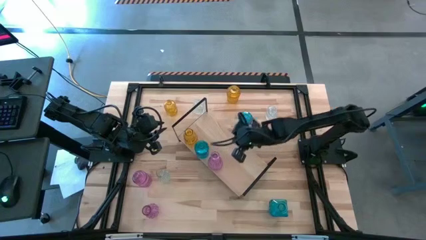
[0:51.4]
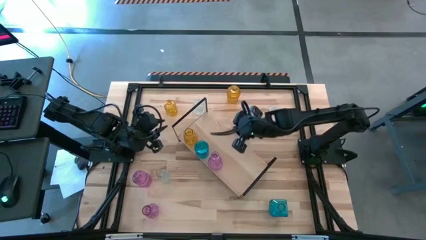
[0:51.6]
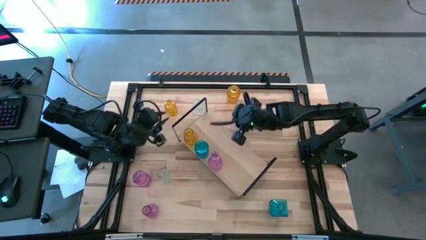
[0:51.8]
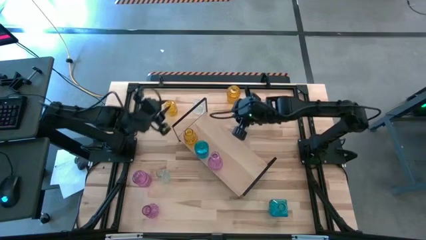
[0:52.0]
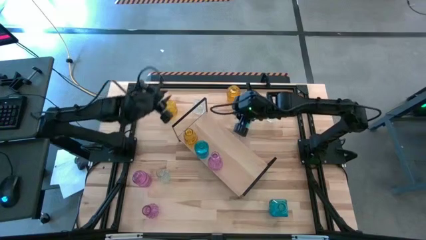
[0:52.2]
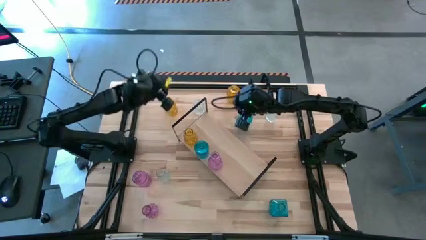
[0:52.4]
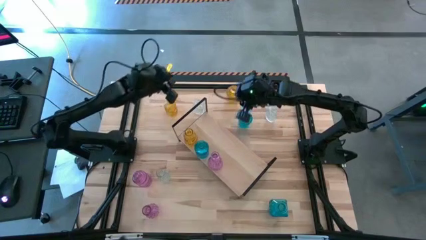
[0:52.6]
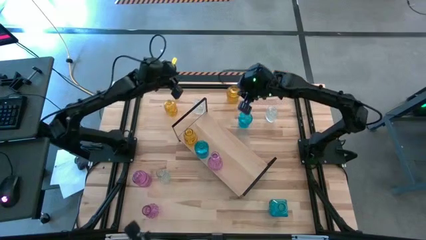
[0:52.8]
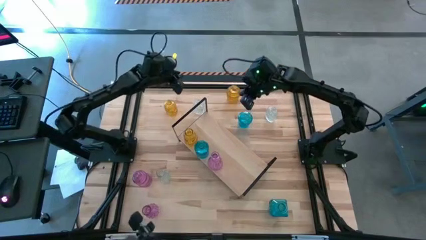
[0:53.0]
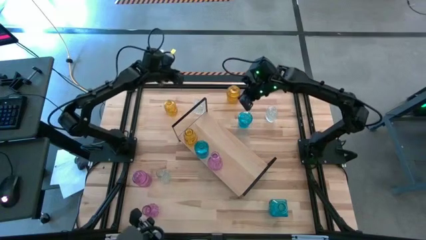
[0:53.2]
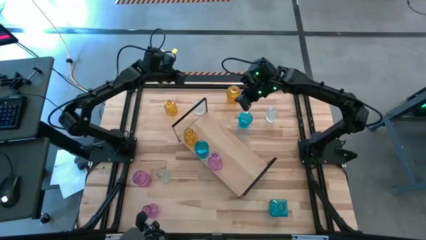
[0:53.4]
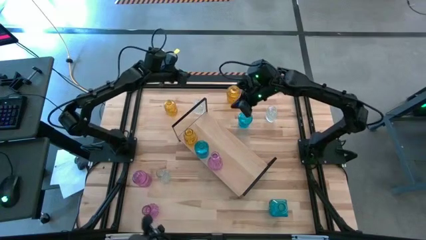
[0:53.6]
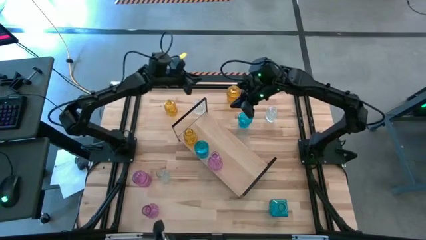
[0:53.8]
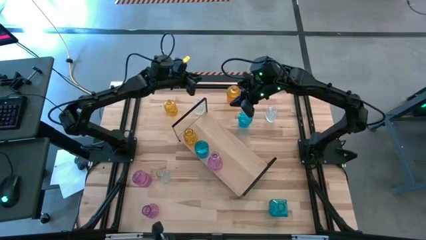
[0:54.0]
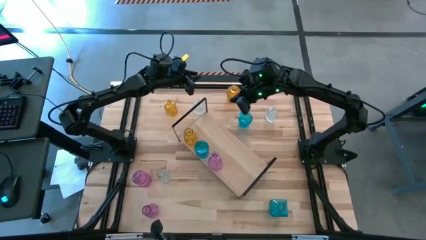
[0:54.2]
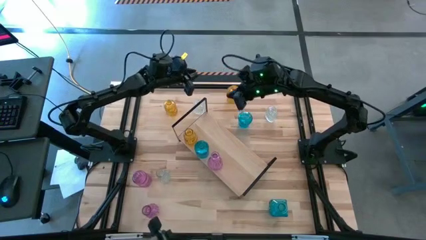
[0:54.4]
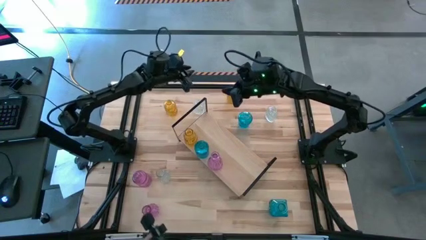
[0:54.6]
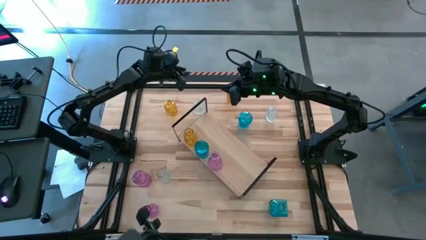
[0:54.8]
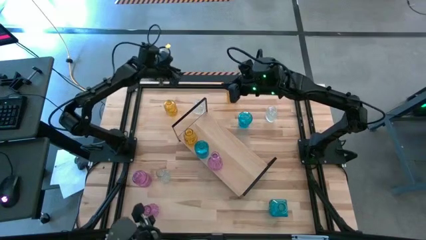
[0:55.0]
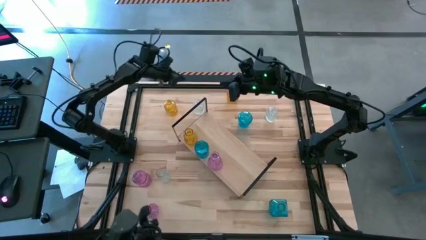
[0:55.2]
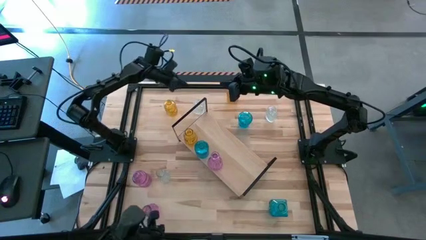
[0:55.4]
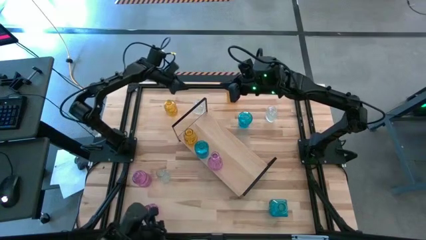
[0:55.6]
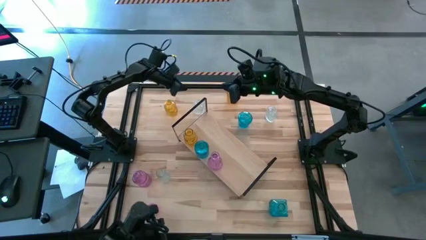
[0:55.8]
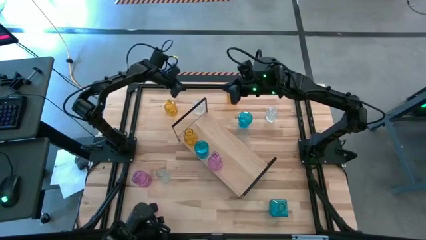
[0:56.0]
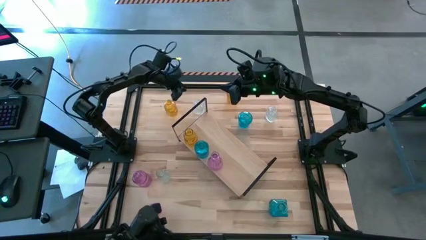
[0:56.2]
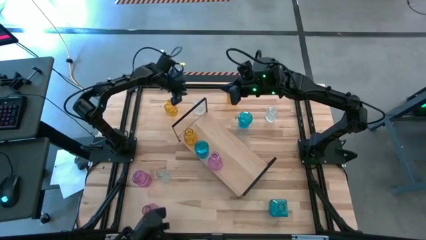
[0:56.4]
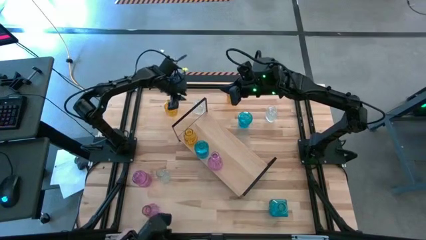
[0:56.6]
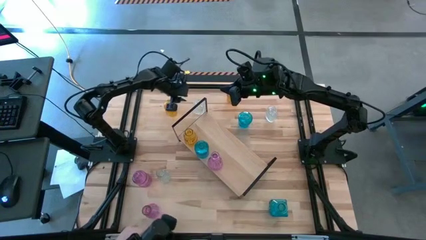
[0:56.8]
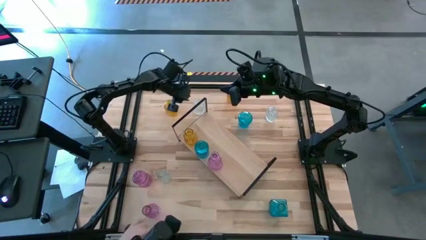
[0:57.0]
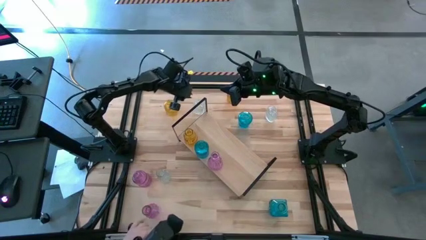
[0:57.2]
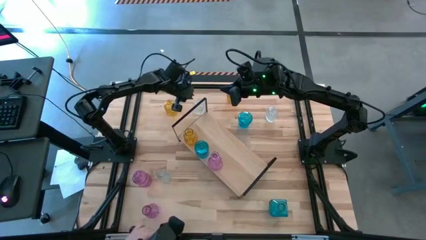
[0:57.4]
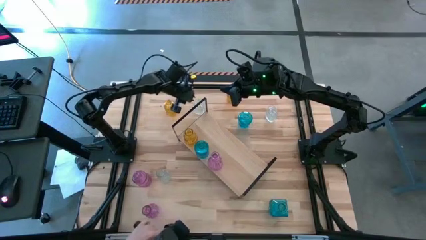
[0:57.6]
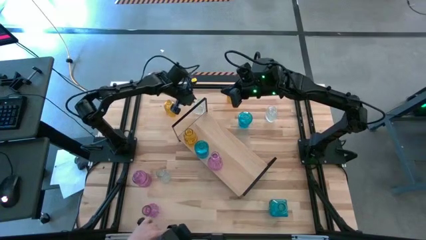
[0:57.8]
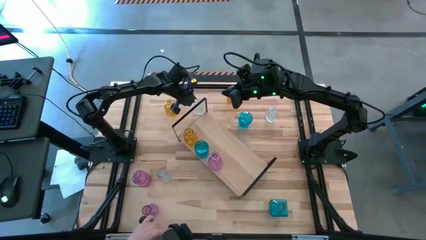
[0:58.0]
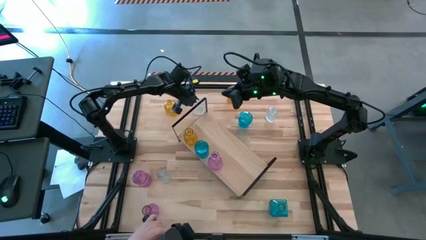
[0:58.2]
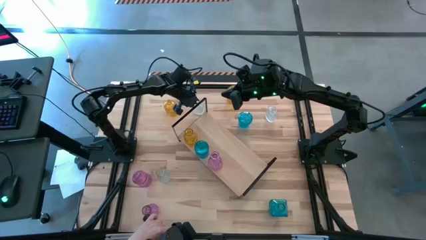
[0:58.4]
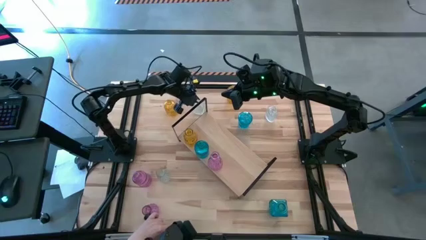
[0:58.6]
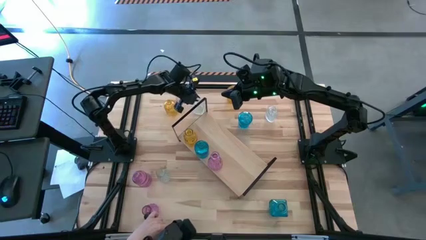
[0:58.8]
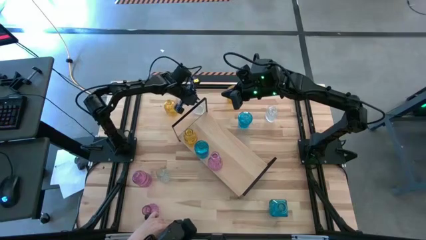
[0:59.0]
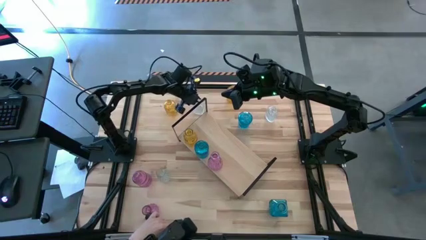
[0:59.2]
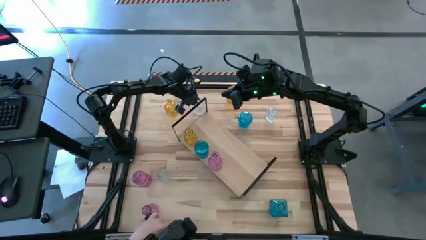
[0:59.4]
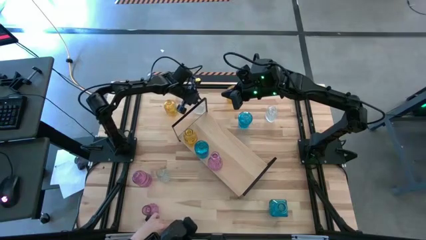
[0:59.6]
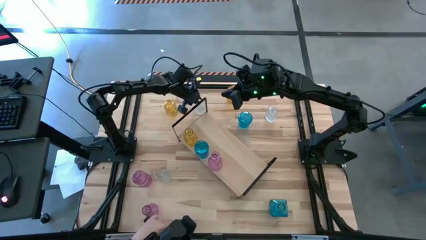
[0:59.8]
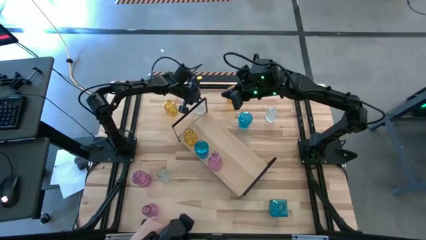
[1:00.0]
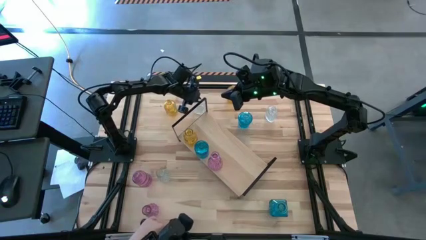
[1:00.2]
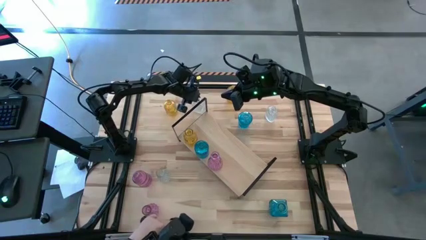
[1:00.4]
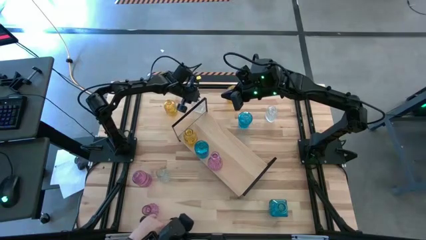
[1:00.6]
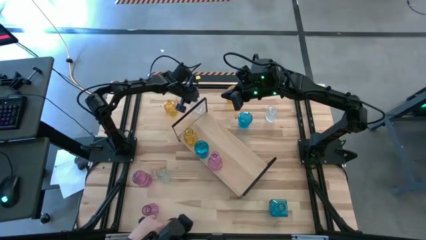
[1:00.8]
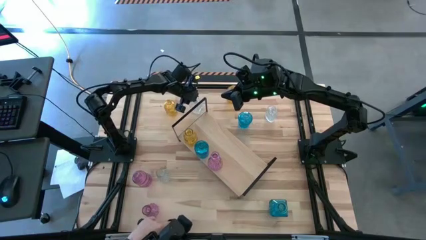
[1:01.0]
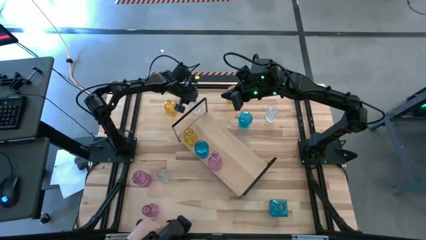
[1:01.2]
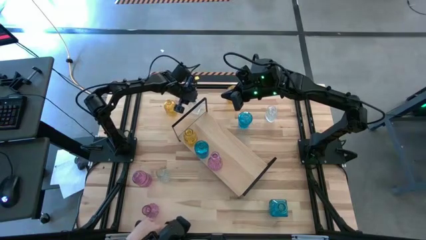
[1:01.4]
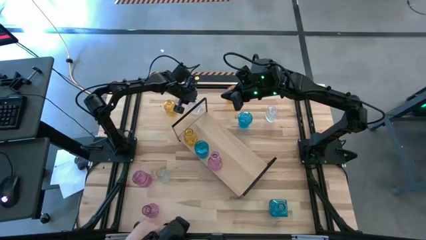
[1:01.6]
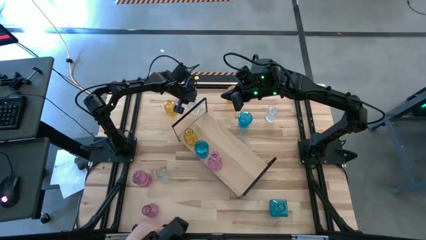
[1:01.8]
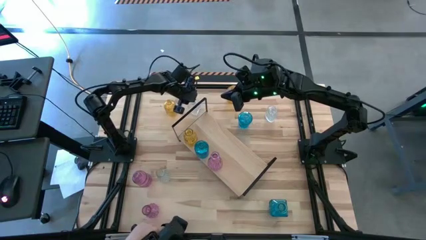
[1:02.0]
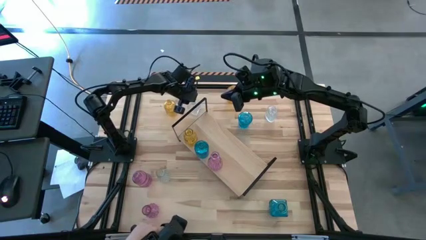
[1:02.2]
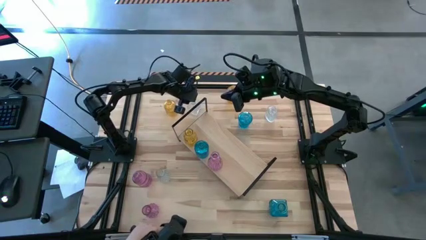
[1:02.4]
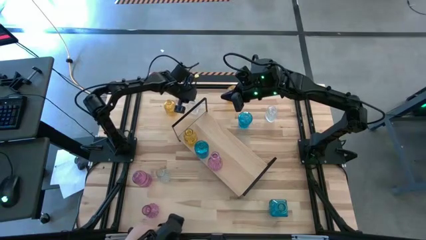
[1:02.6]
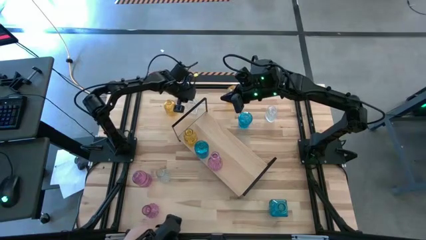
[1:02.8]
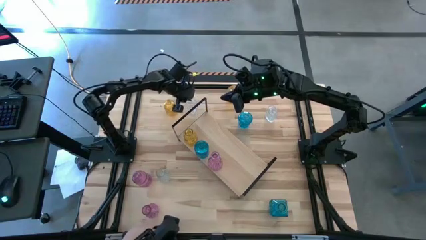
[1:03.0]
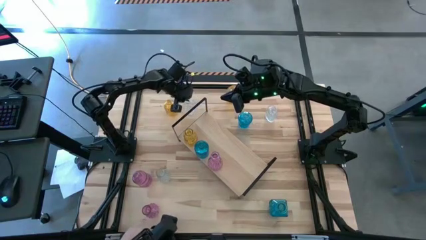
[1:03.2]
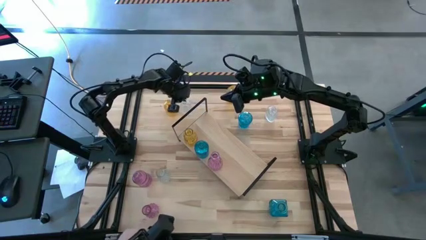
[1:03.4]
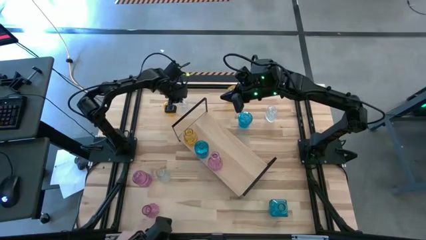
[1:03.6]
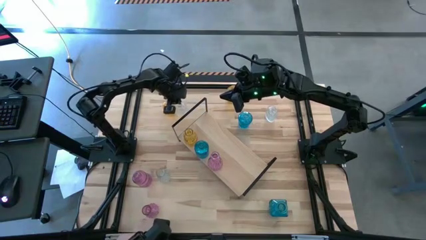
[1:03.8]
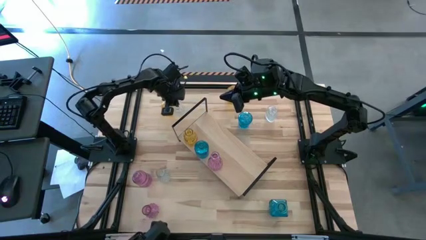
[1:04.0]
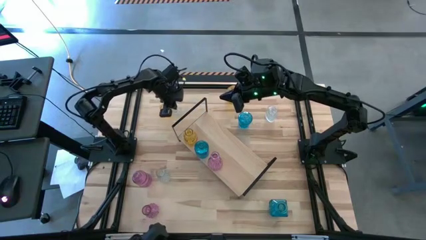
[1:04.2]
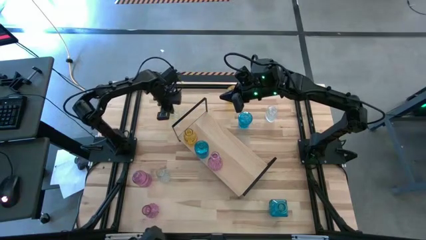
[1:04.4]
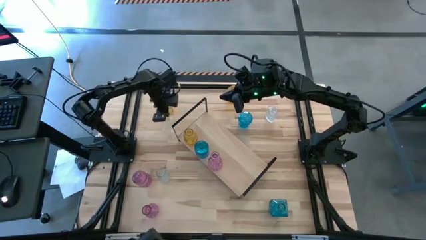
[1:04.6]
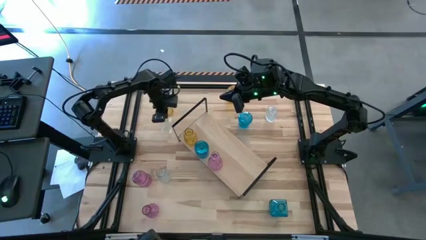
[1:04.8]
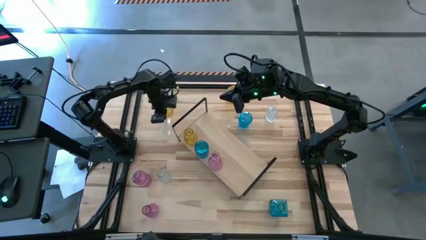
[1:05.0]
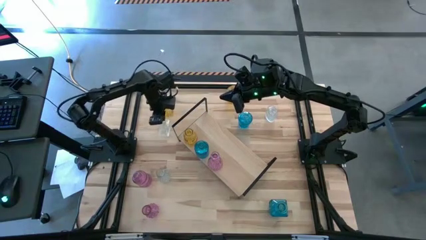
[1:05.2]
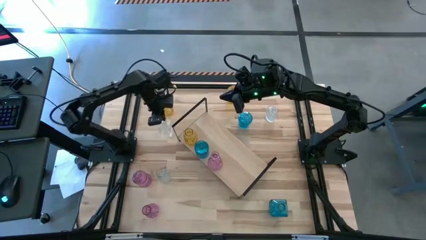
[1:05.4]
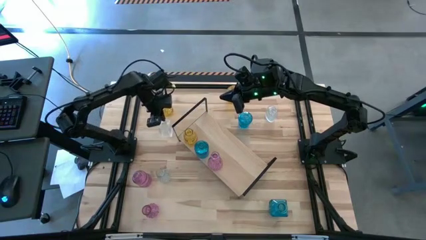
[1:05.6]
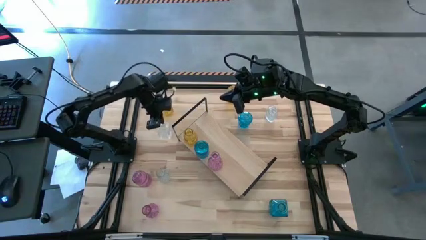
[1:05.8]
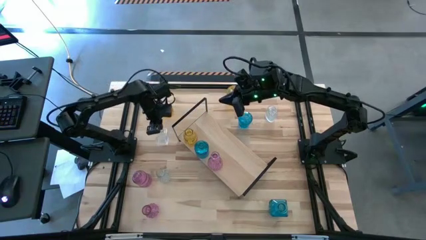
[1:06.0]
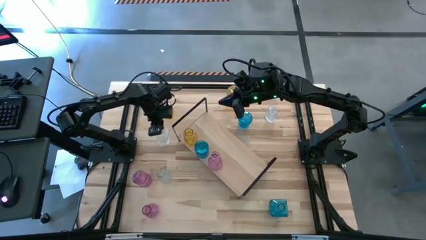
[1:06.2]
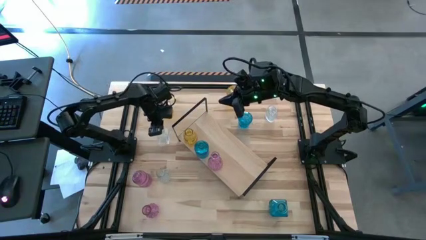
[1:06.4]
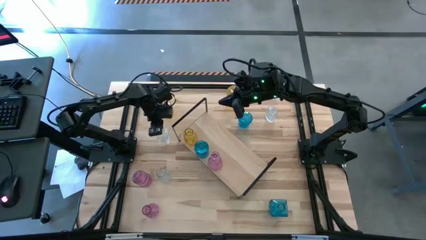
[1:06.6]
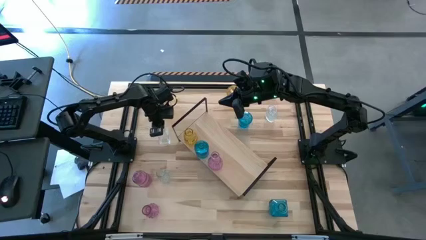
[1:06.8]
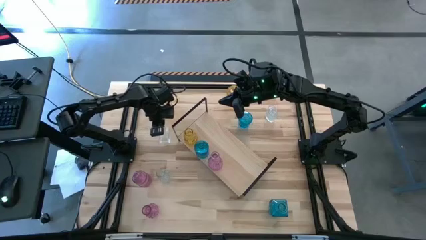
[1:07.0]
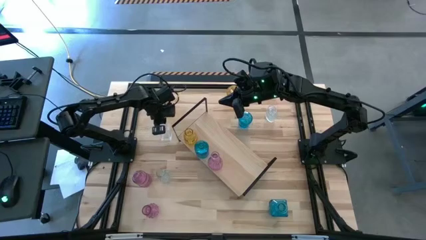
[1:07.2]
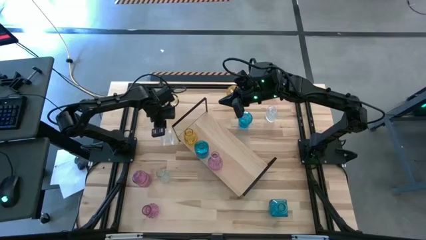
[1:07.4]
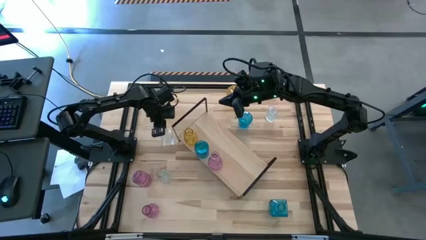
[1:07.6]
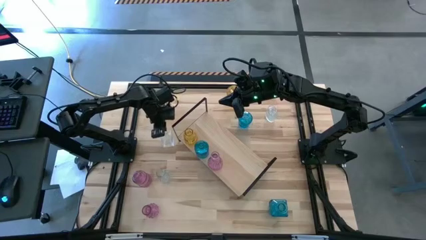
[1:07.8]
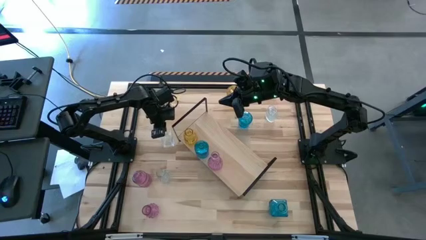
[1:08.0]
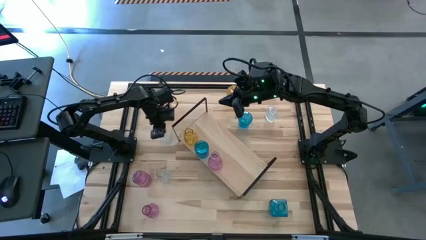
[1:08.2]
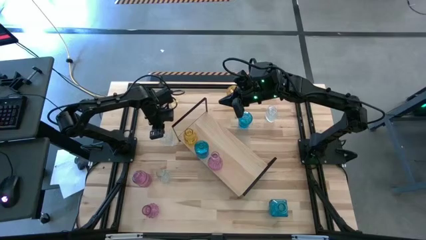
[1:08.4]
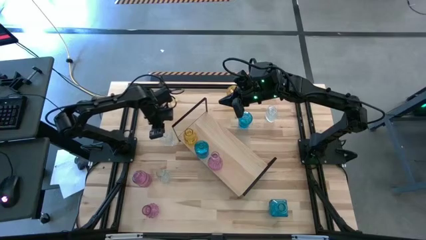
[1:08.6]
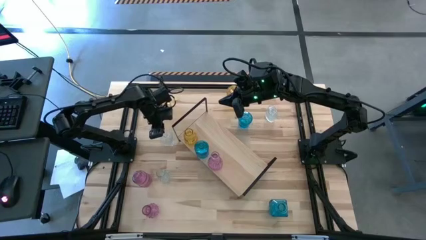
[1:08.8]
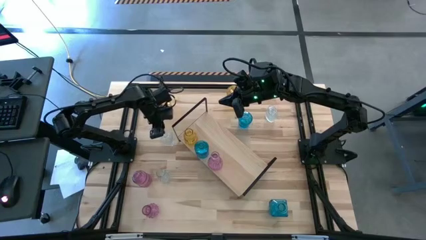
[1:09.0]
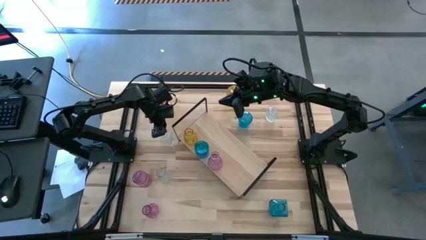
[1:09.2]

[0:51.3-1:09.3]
Task: sort vases onto shelf
Put the top left crystal vase on the shelf
